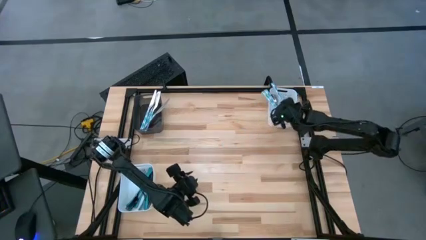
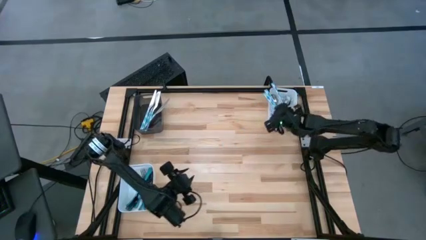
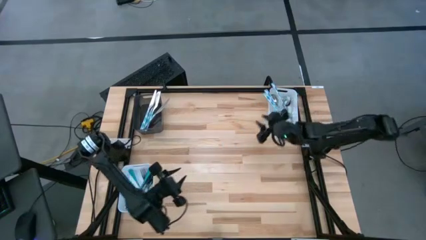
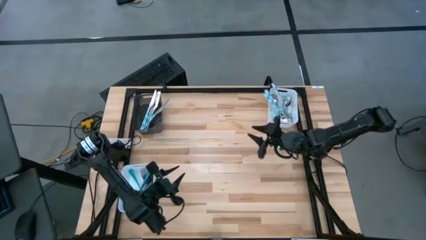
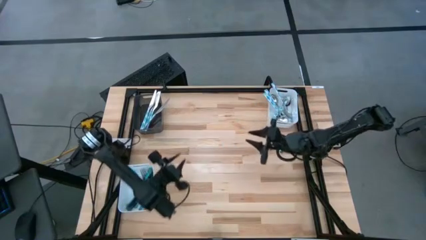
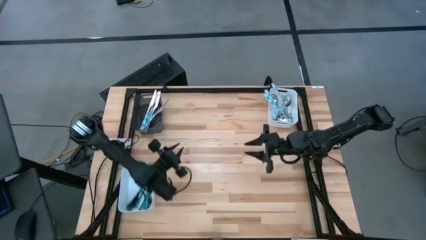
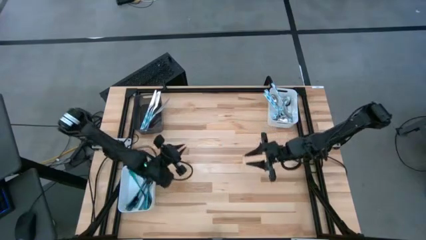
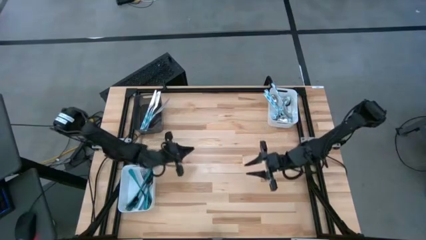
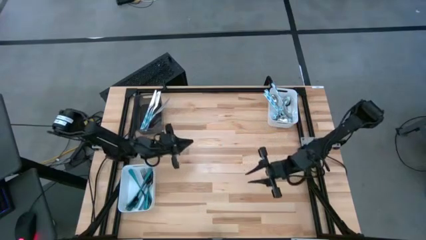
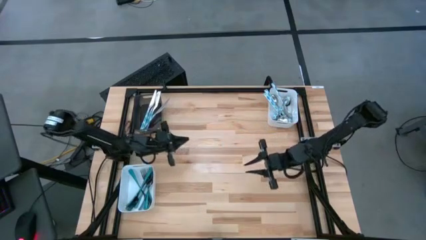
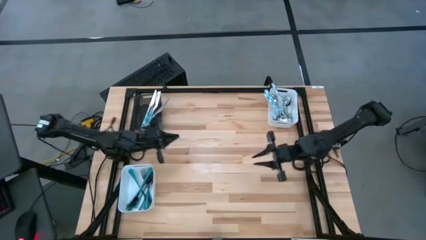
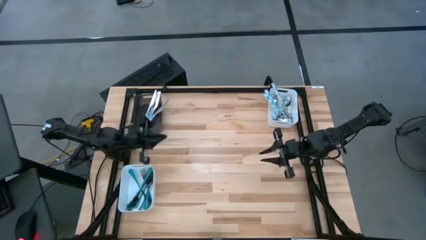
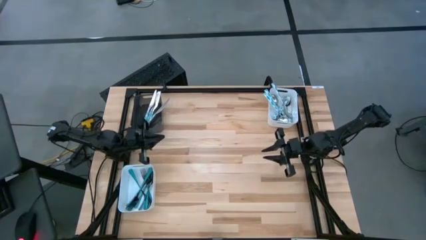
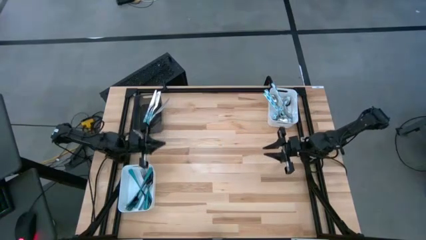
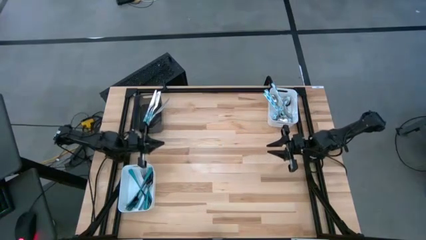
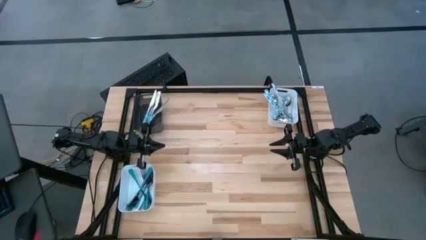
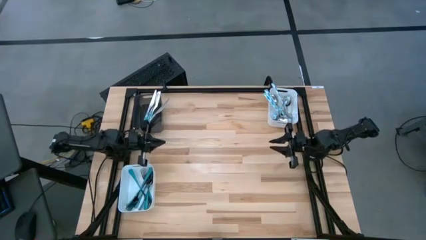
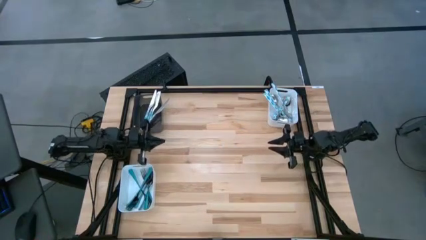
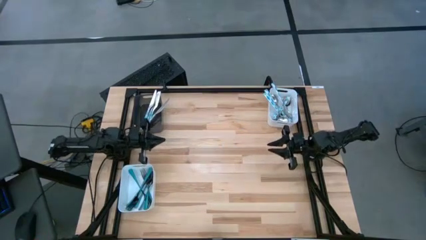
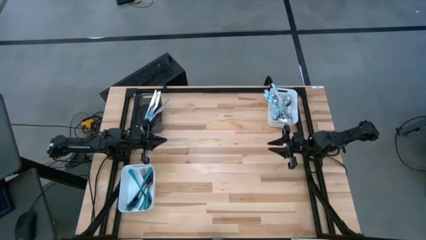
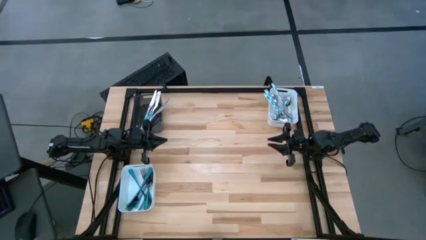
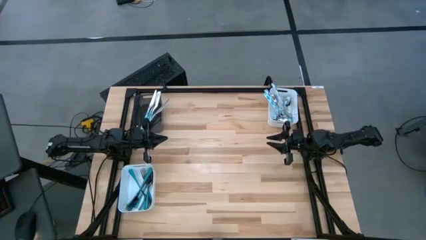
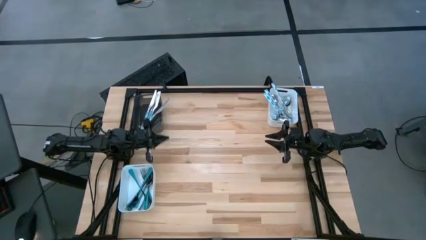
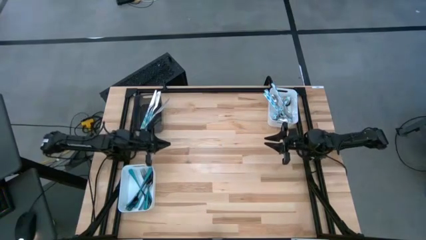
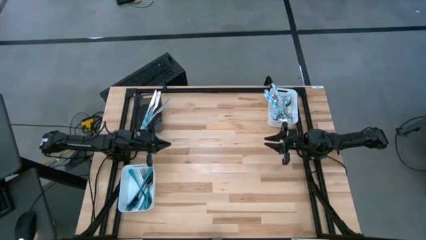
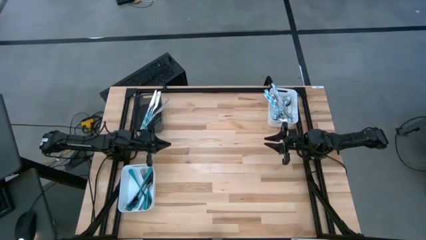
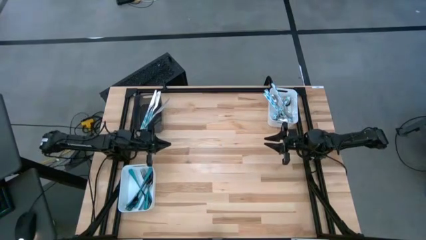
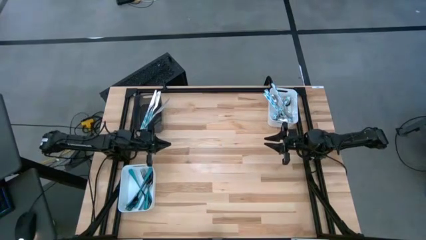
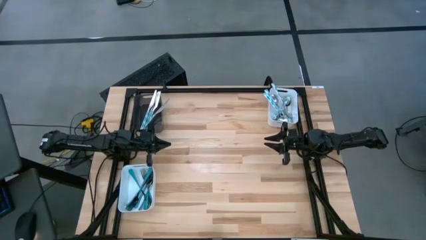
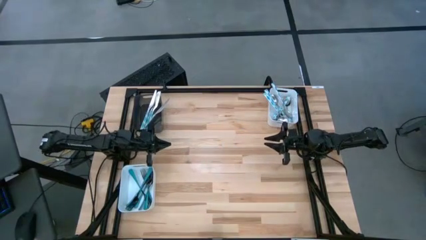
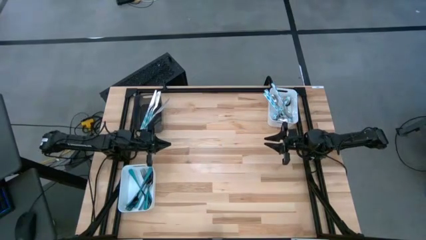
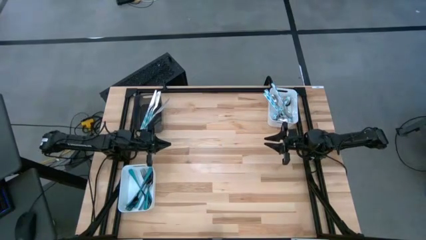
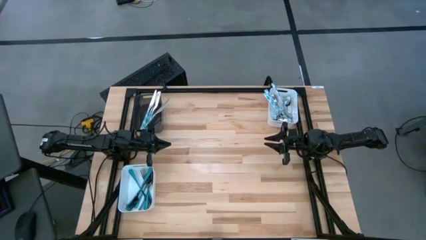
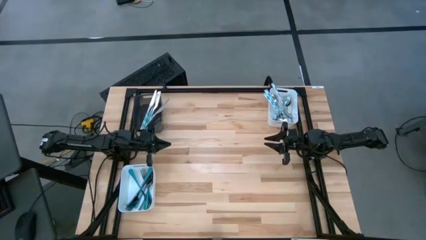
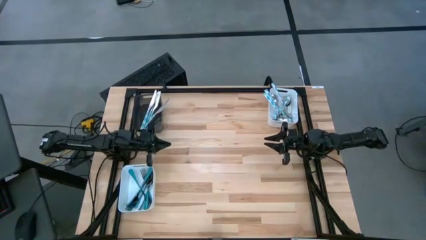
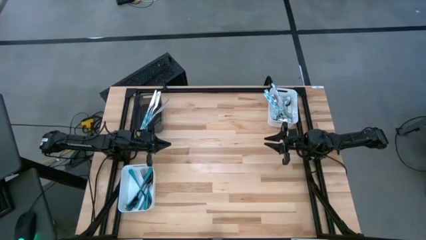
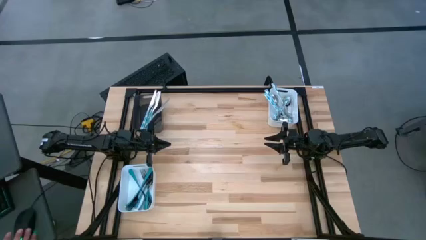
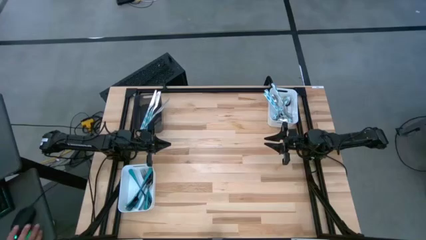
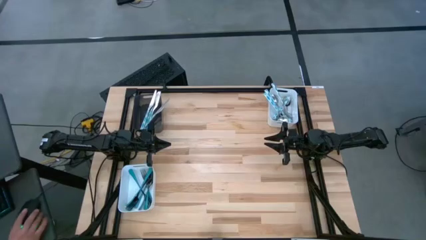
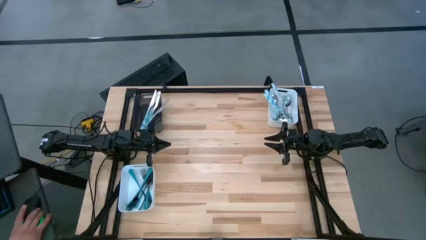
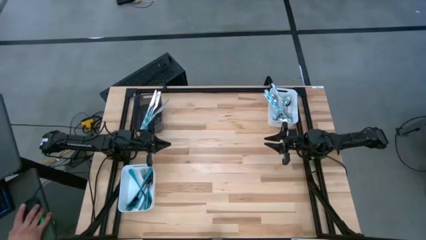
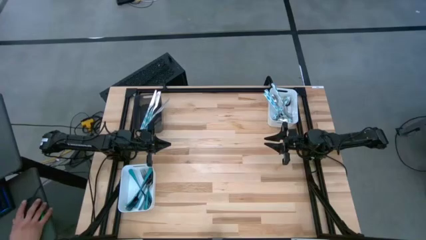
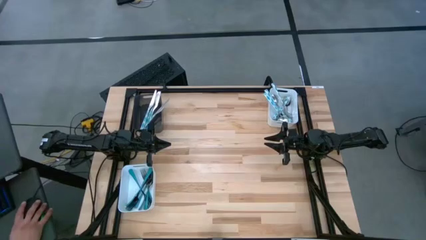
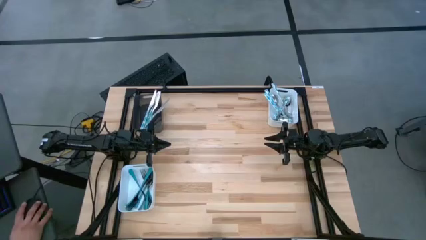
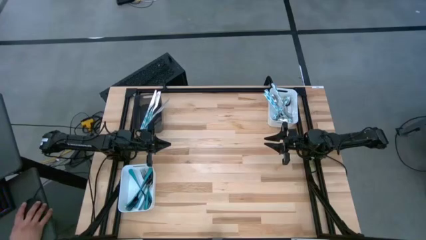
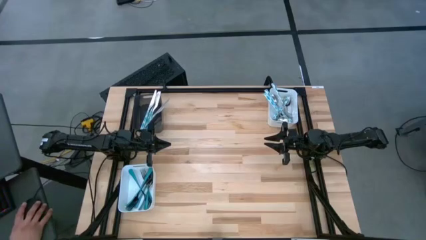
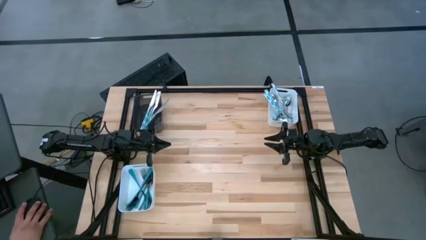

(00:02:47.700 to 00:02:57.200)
Task: Sort silverware by color (type)
Return to Home Position

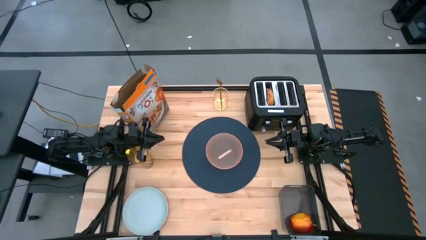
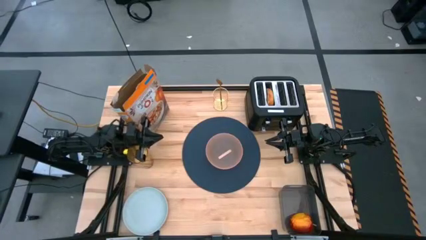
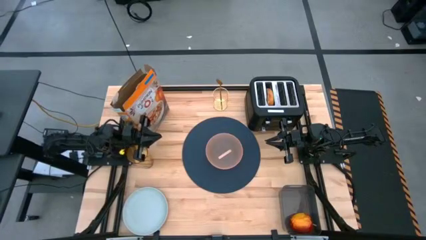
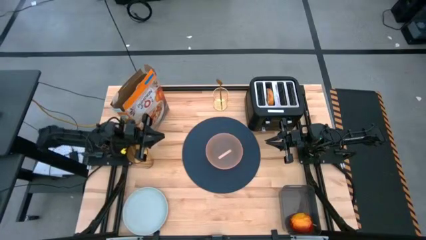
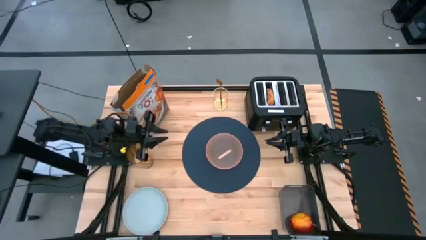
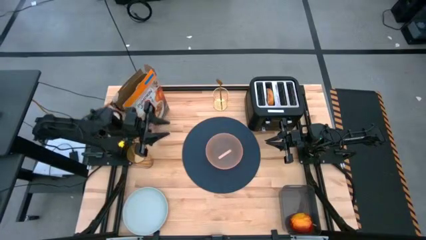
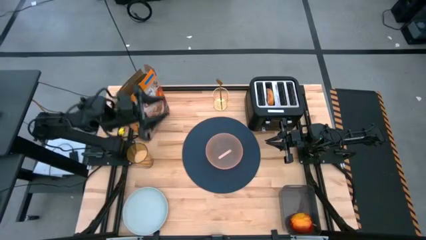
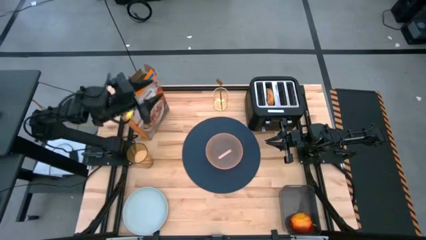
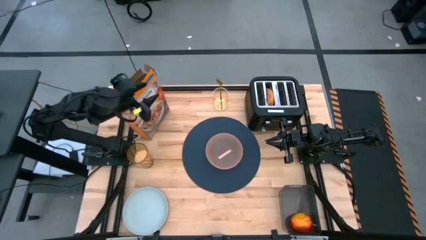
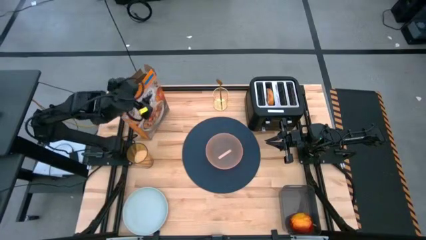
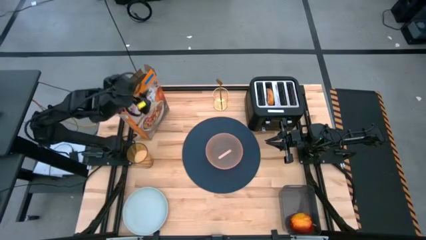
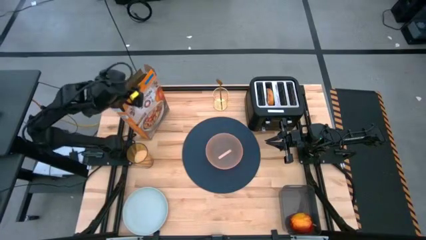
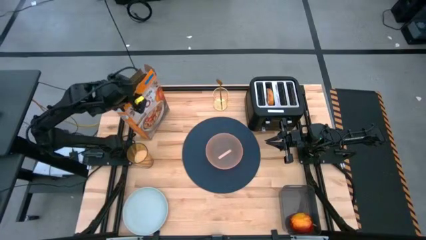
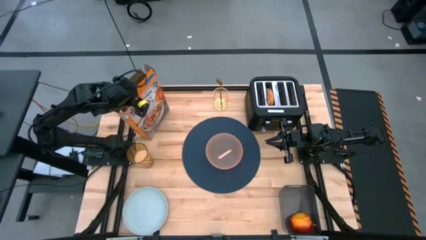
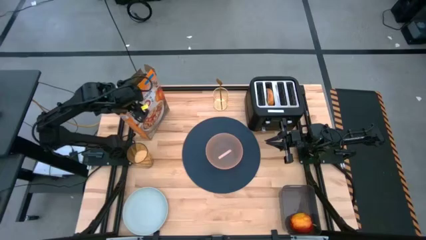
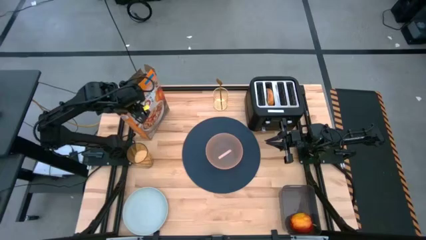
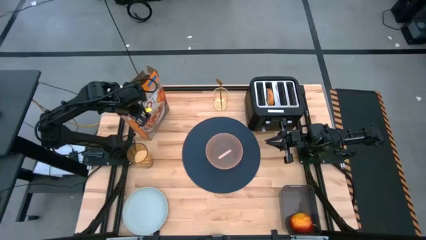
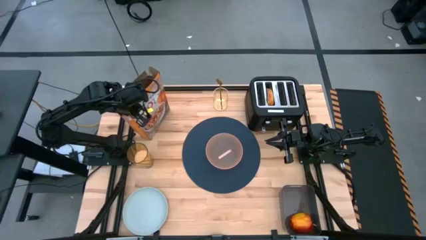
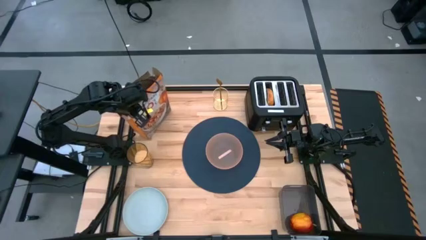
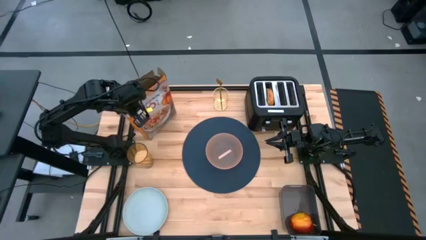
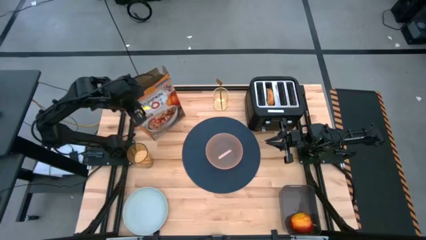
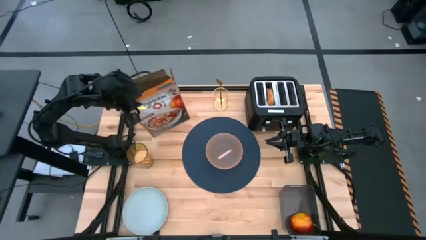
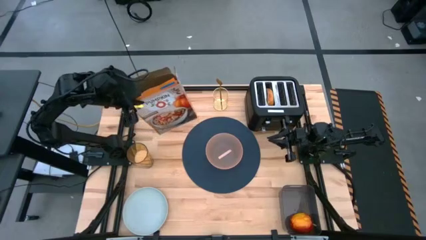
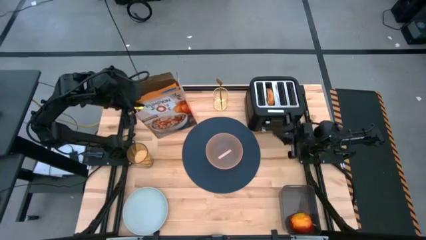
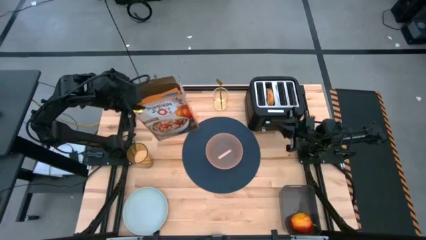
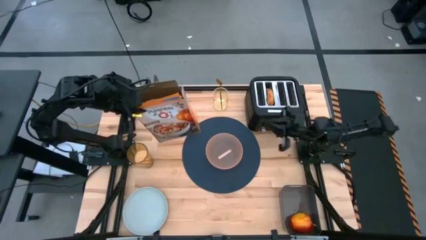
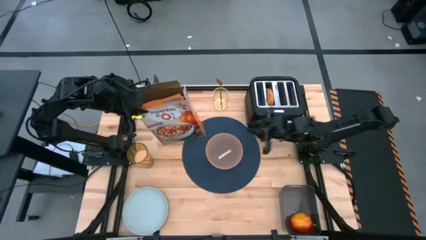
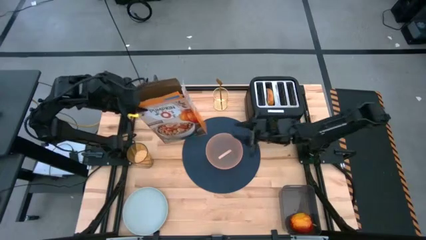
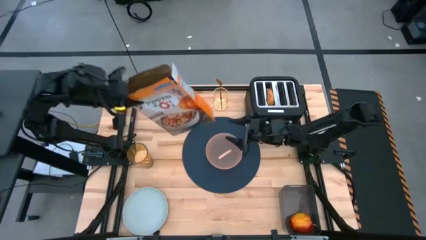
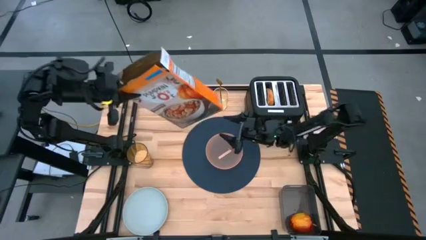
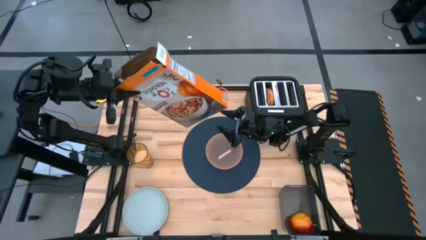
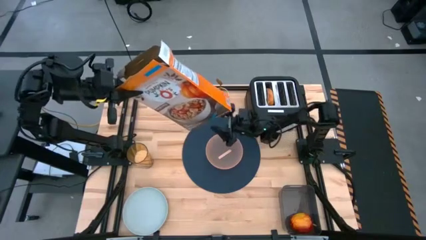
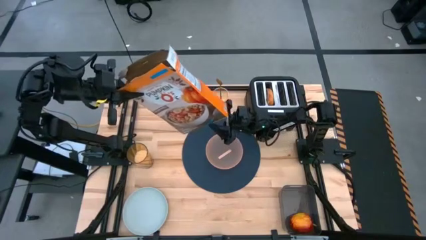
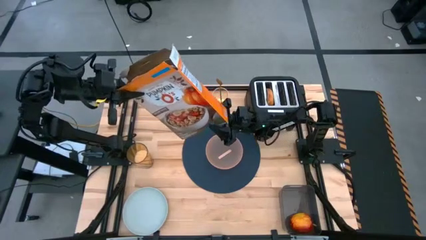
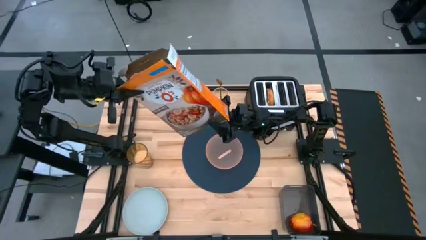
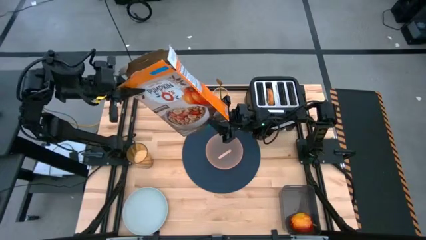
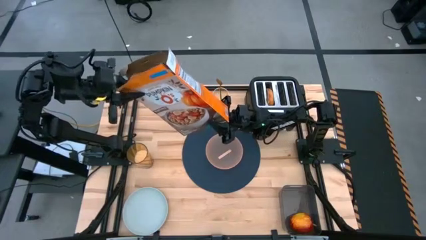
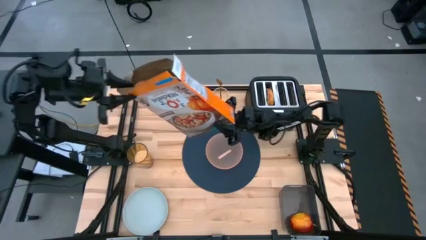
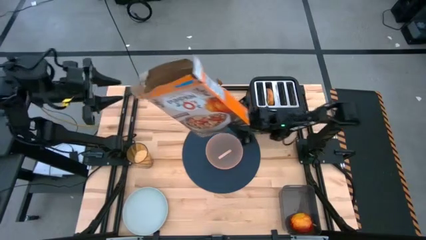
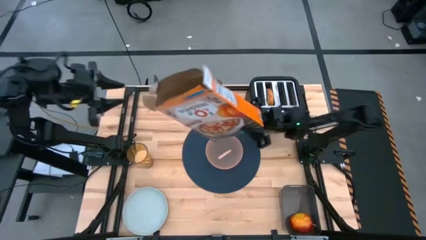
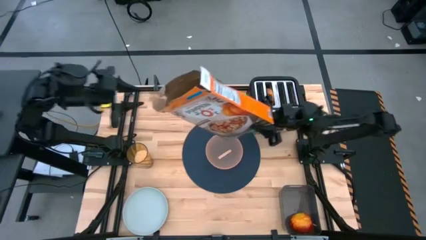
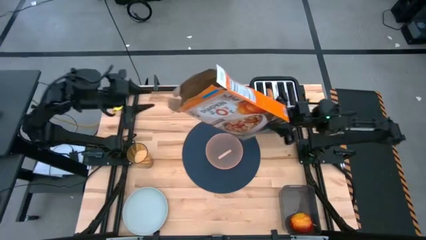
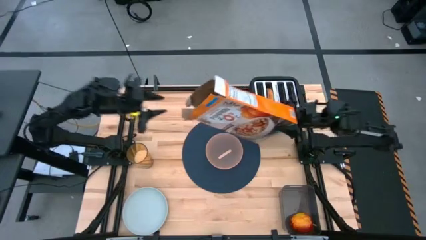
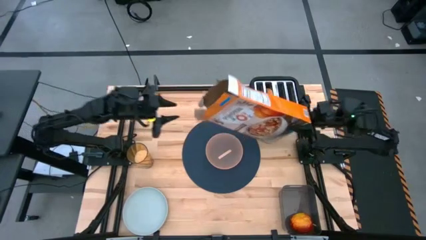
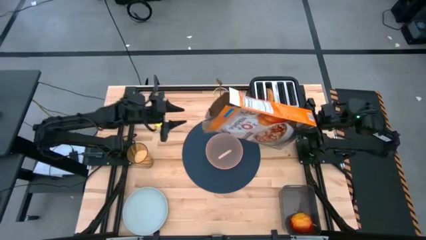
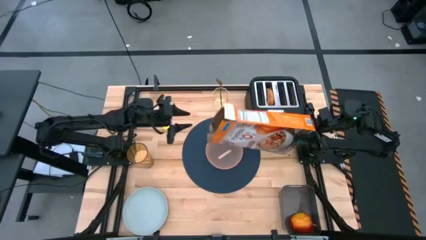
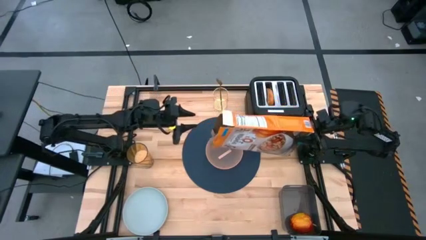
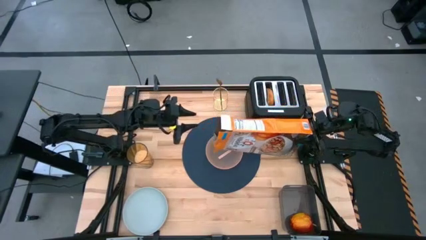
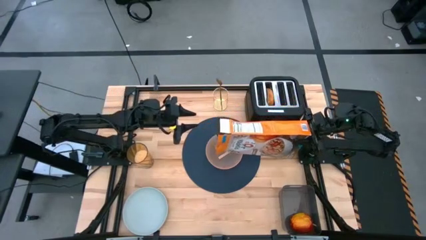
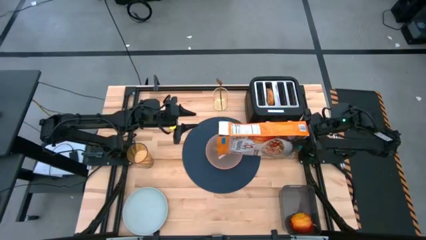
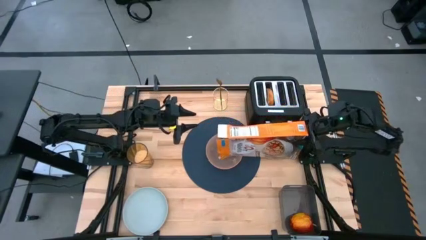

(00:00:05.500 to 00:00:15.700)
Task: Arrange a breakfast setting
Pour the cereal from the cereal box into the pink bowl
